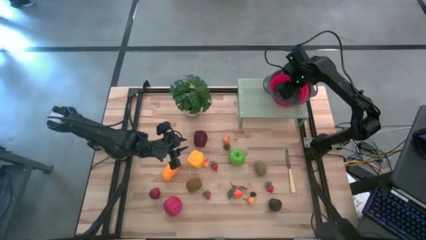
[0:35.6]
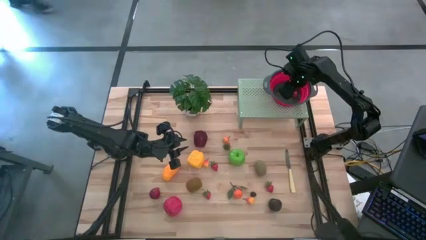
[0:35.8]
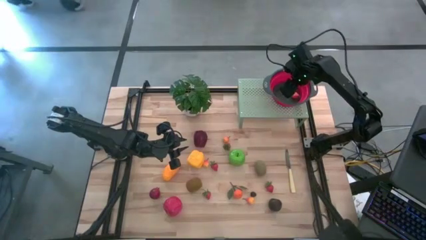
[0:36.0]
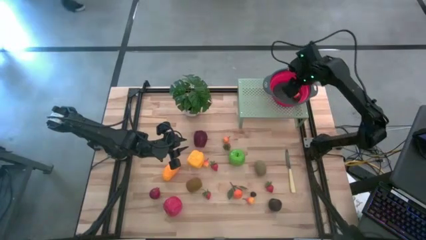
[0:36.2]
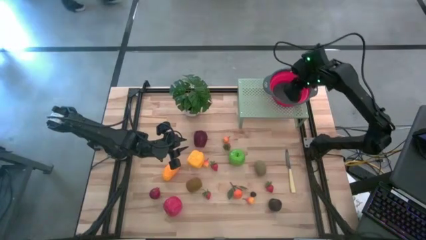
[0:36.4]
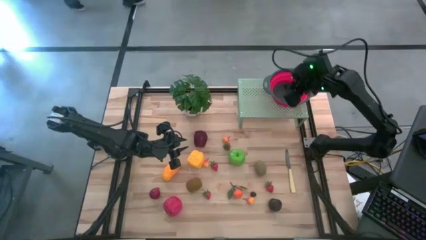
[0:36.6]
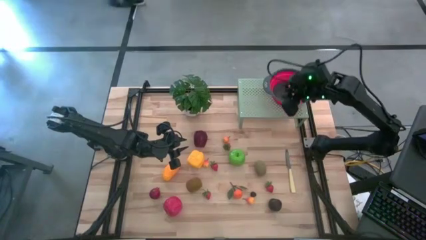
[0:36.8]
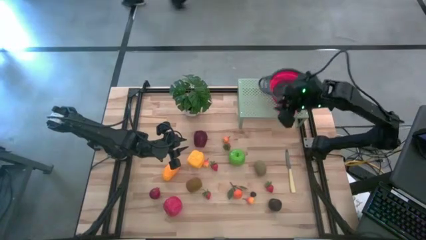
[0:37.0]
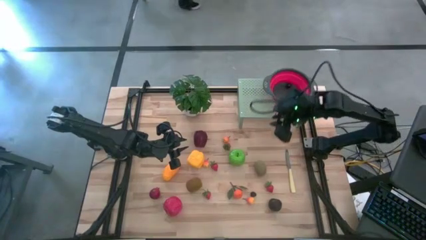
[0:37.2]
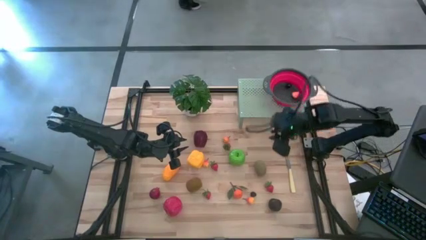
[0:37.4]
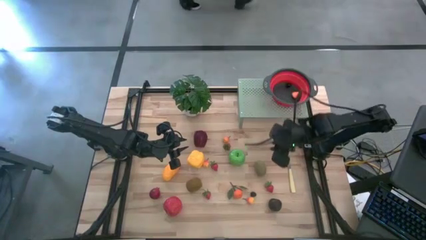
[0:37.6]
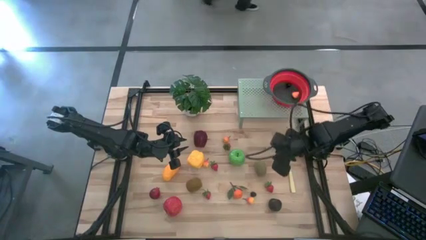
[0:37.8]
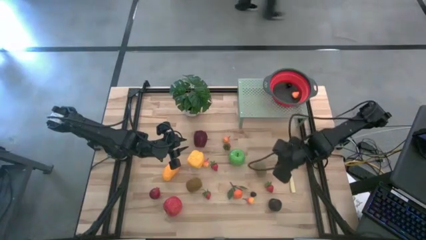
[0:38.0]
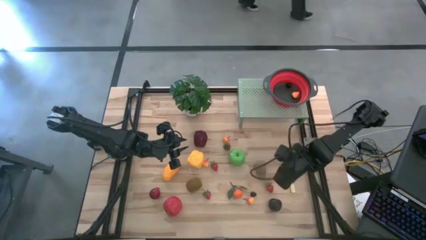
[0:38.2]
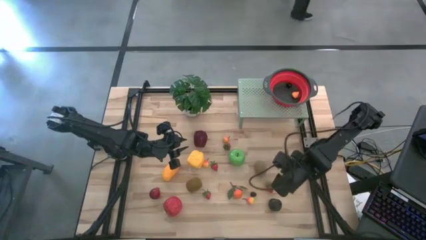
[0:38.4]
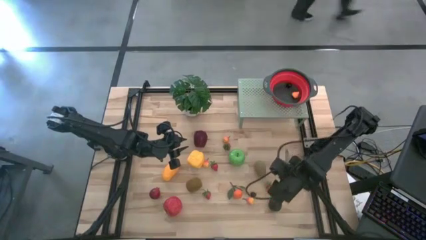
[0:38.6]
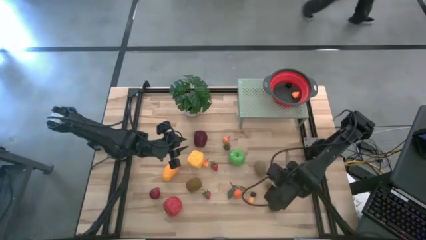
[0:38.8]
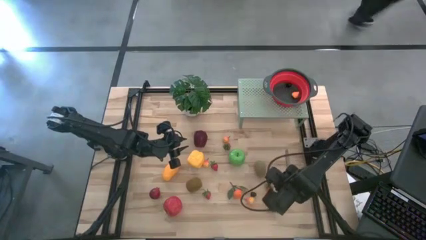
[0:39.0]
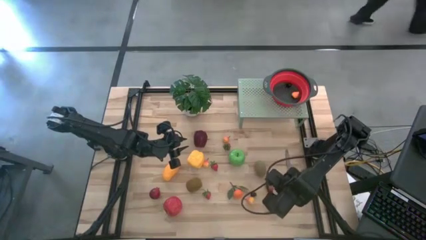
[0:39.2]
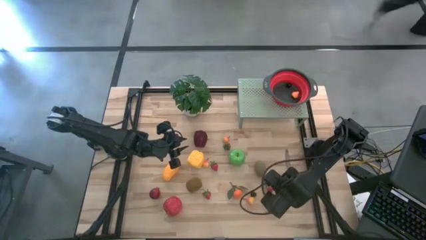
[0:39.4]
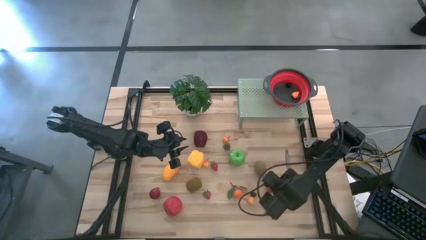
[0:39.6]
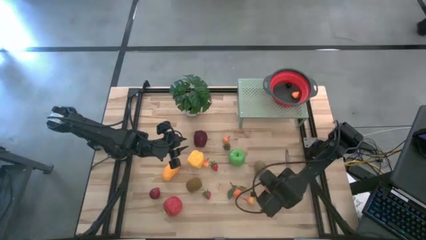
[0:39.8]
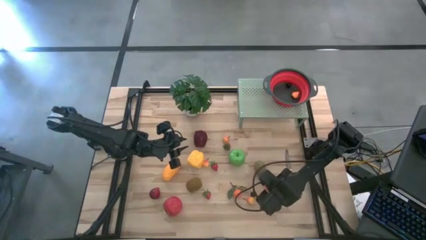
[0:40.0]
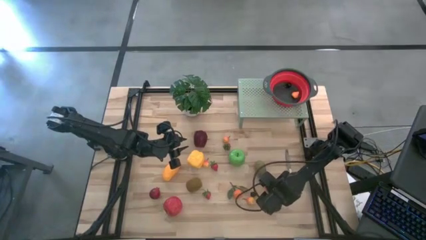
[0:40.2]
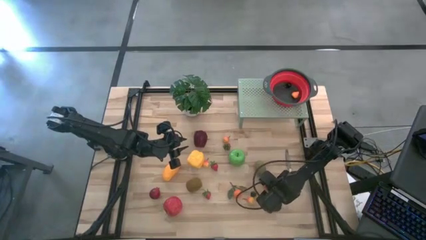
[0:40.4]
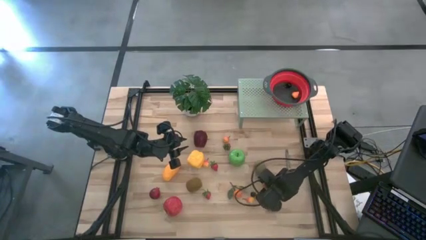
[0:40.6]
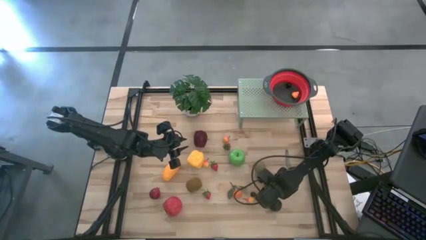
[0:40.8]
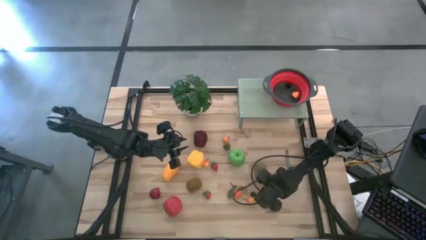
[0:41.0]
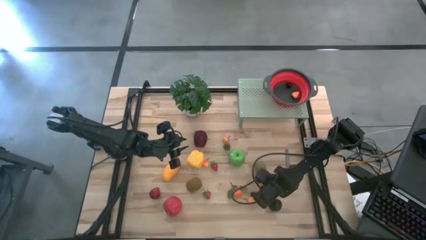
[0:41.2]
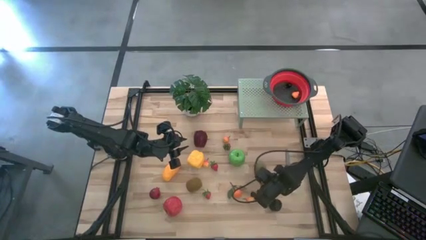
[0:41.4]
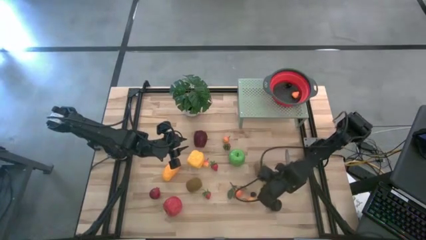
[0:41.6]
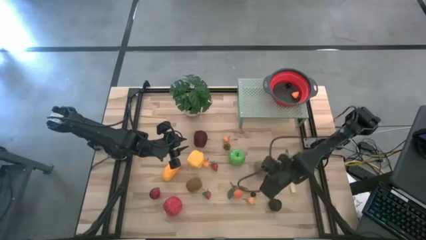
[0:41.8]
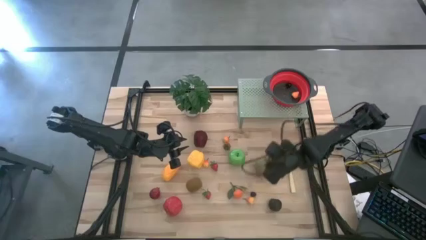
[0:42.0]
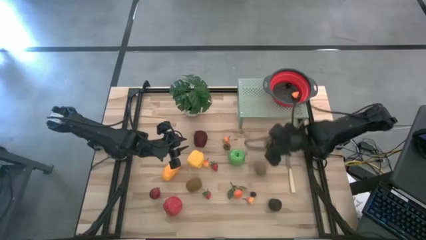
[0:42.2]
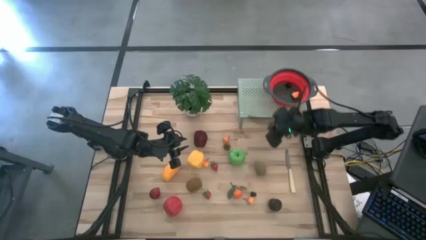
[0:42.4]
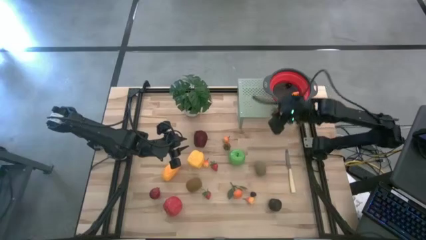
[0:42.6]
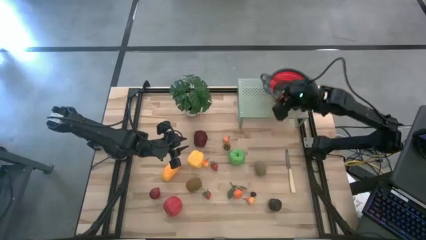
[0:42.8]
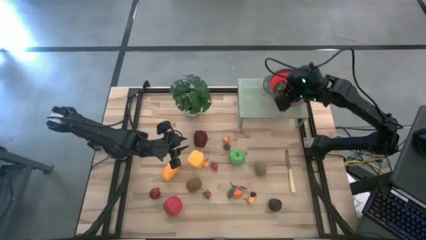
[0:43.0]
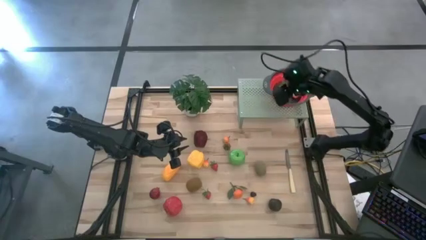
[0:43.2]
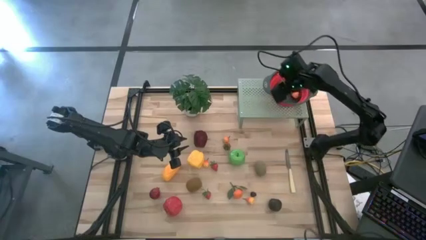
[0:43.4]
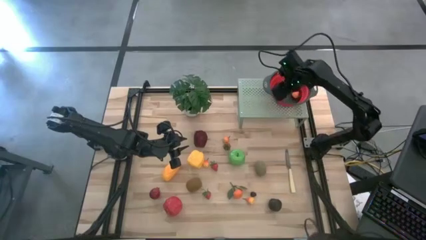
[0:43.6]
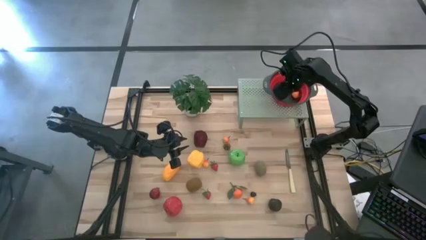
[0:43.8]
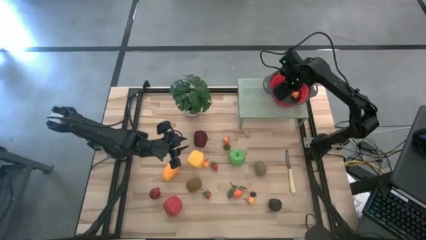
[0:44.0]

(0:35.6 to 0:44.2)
Task: Pick & Place Fruit
Put the red strawberry into the red strainer bowl on the shelf

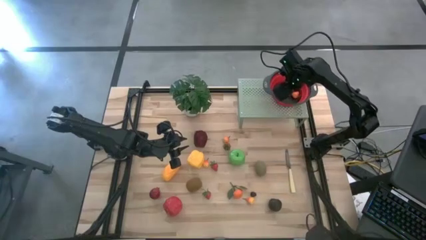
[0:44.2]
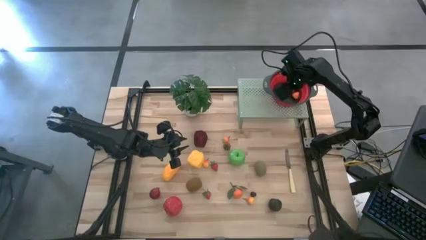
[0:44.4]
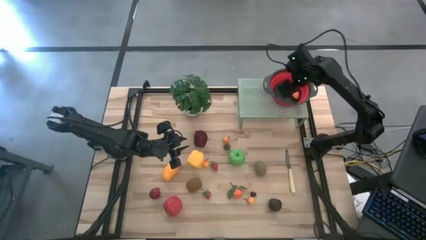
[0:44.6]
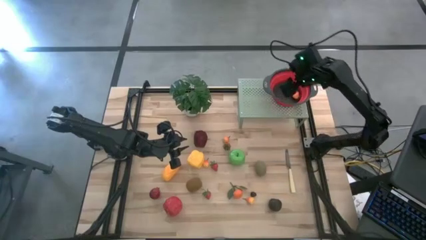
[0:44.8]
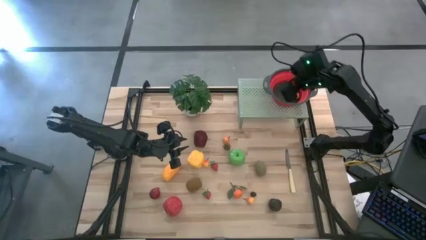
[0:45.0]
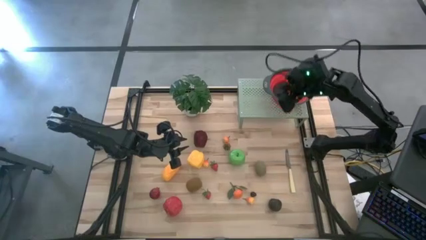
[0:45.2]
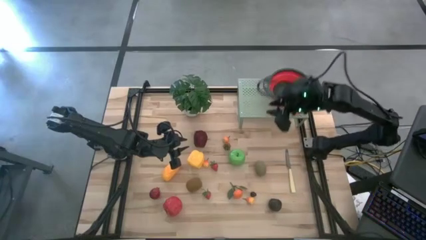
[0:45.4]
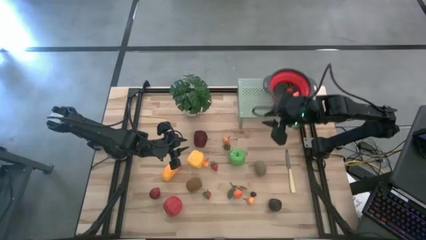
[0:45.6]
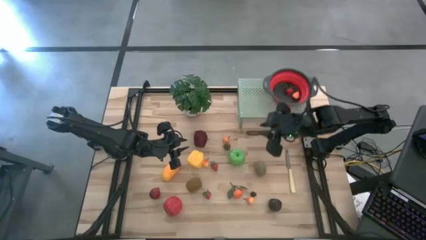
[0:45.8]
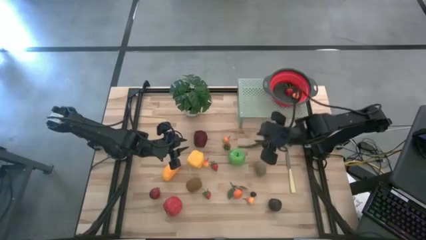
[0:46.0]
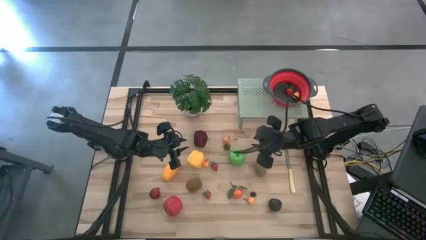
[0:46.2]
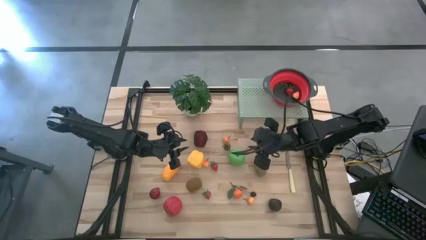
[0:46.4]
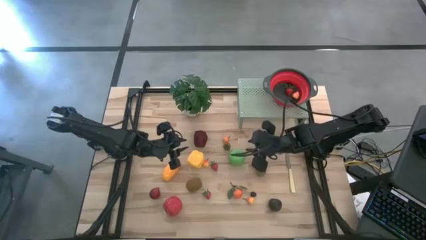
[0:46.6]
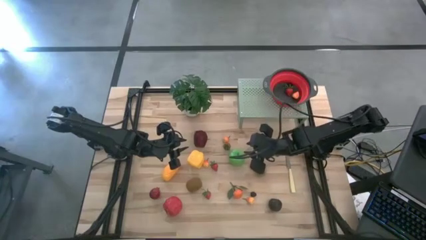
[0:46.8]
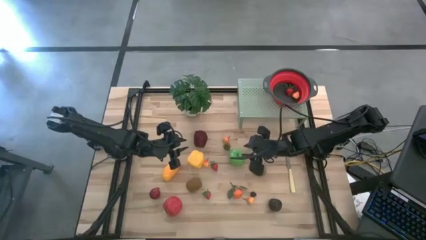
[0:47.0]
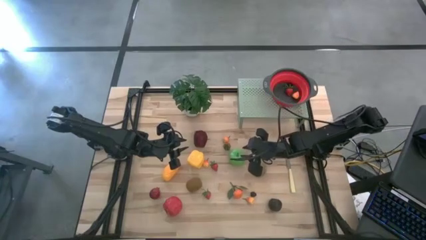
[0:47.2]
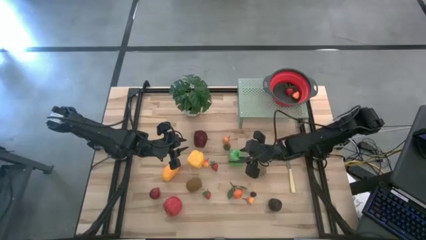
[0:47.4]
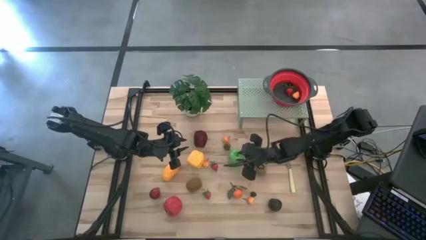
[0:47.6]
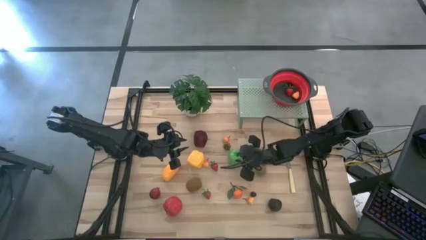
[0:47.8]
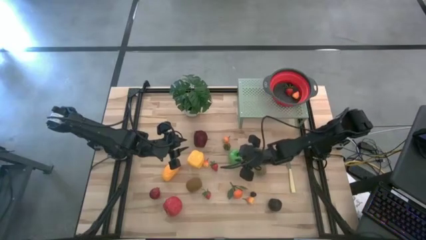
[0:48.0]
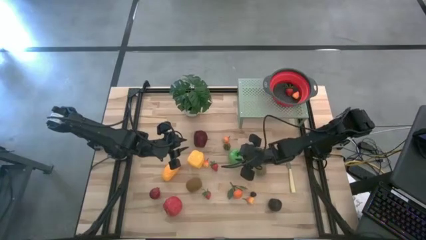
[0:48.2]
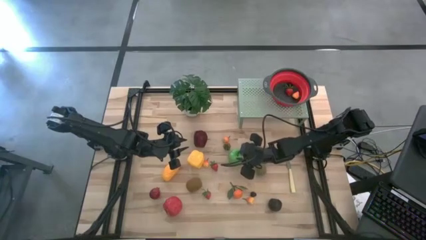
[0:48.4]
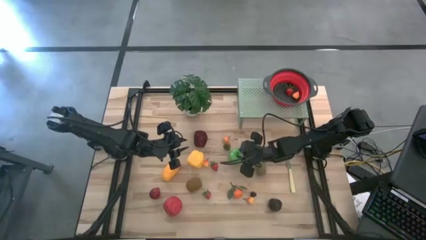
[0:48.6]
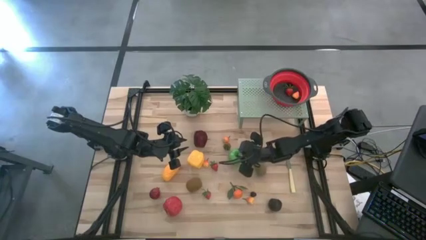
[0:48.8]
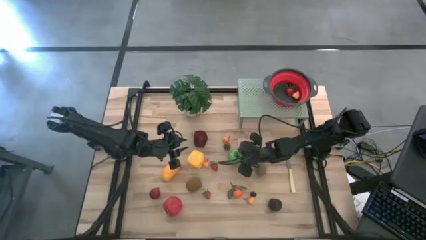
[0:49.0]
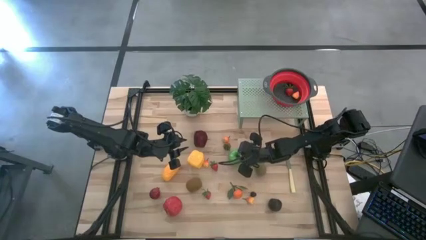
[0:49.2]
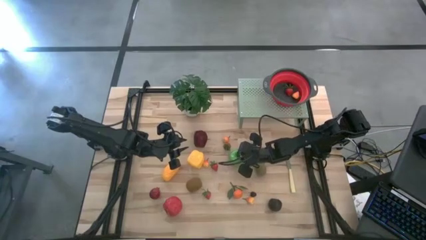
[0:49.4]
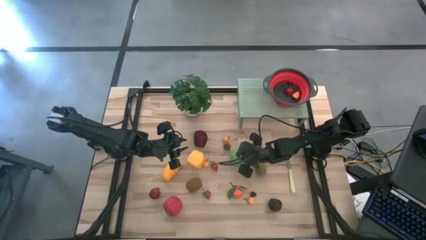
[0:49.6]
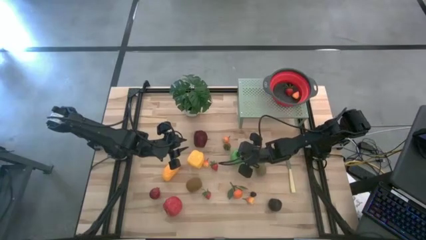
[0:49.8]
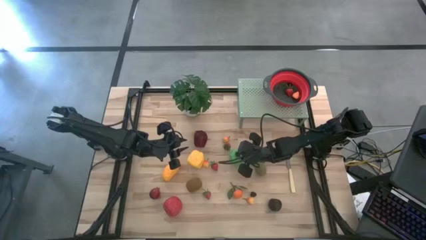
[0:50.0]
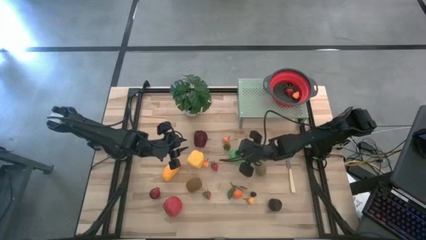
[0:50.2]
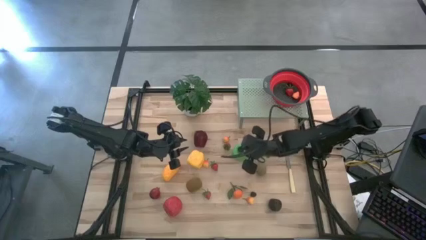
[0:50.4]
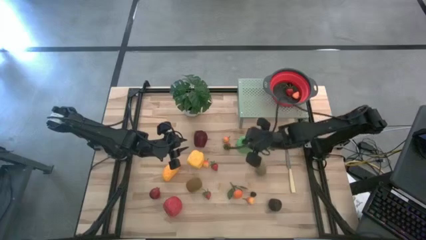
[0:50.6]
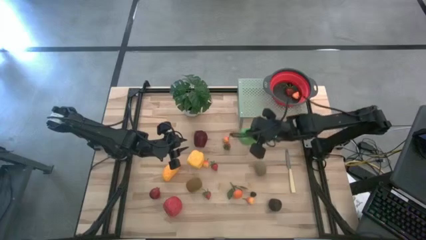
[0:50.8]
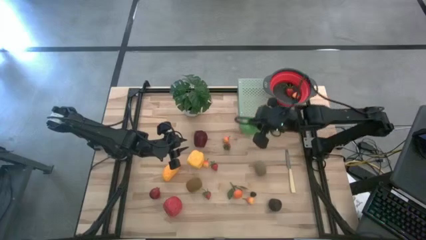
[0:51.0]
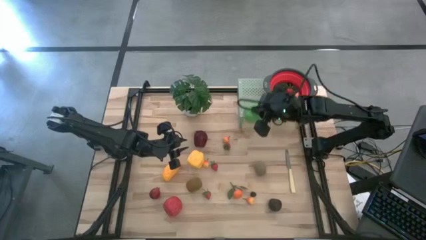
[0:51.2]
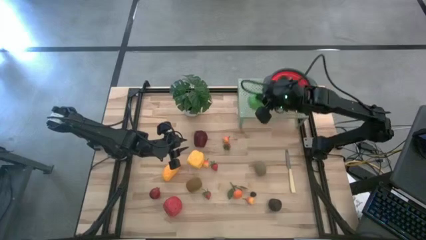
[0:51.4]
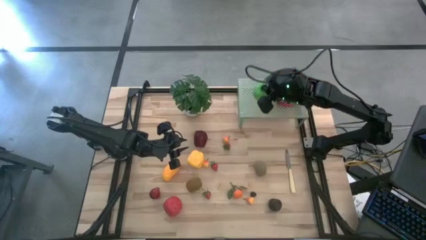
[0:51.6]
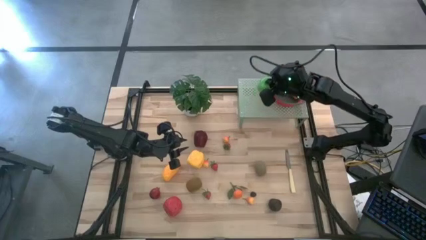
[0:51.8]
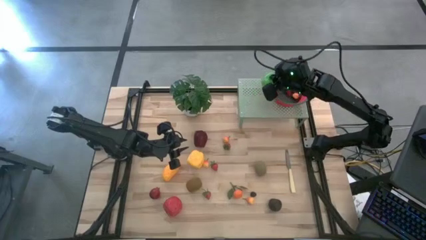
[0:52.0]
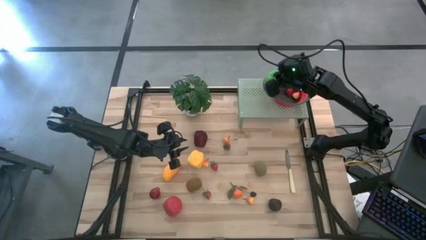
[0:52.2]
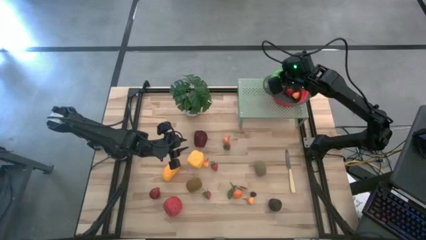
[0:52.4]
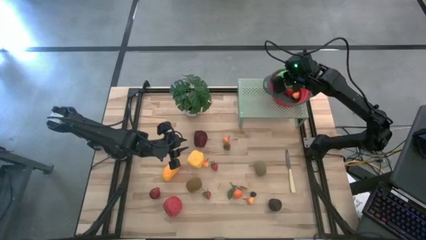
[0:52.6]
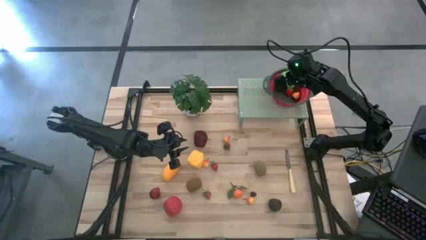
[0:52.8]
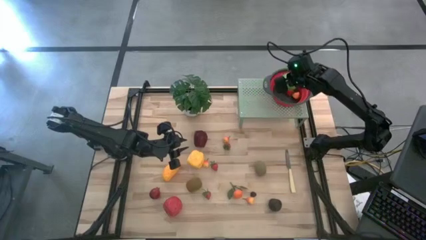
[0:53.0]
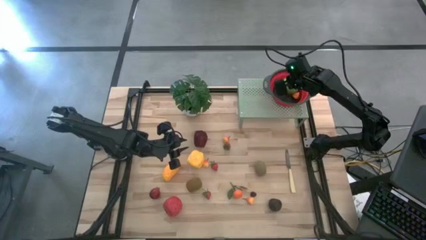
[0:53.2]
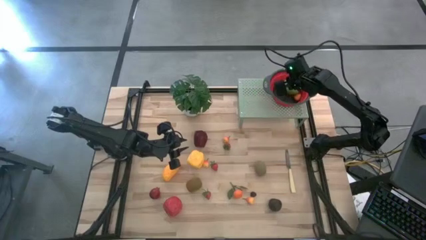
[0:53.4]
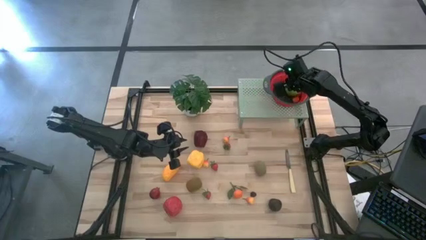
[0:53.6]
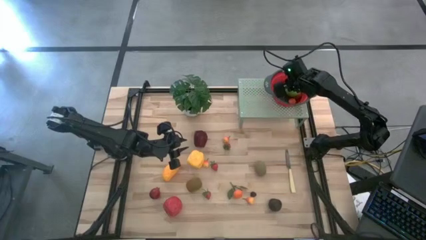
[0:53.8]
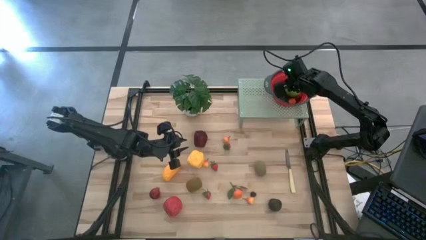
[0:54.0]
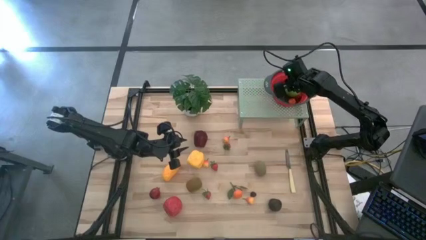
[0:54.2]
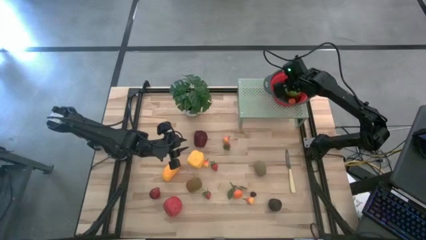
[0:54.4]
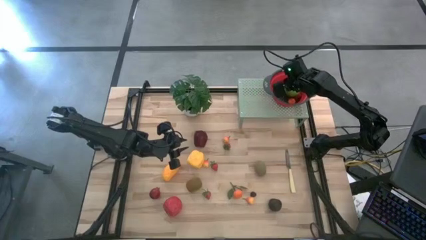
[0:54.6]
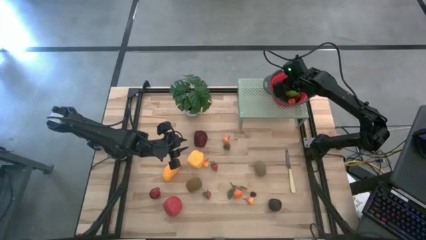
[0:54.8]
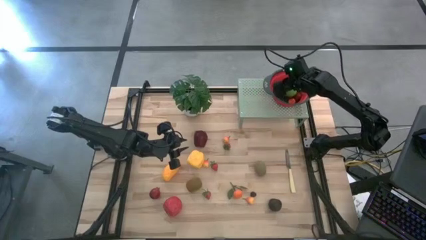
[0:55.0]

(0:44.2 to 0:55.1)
Put the green apple into the red strainer bowl on the shelf
